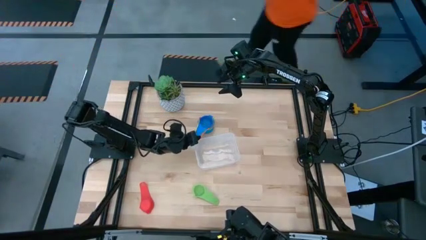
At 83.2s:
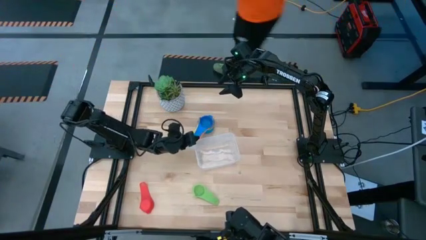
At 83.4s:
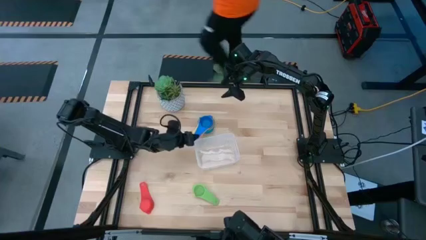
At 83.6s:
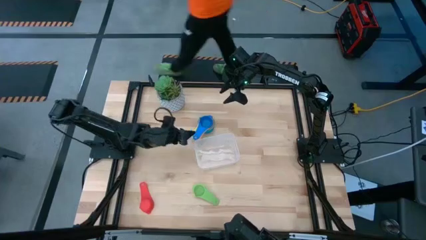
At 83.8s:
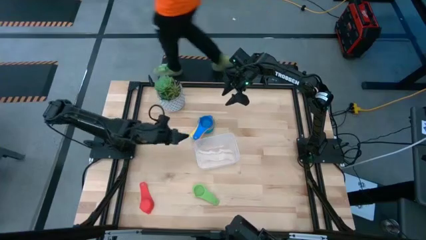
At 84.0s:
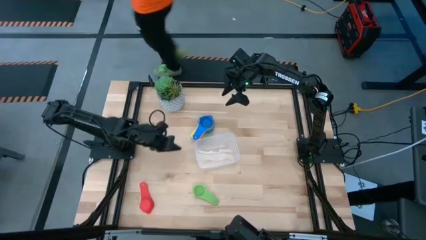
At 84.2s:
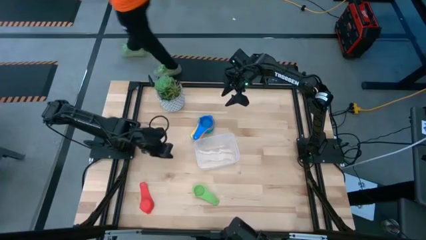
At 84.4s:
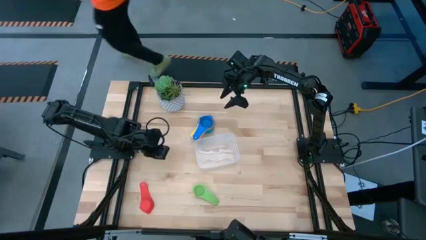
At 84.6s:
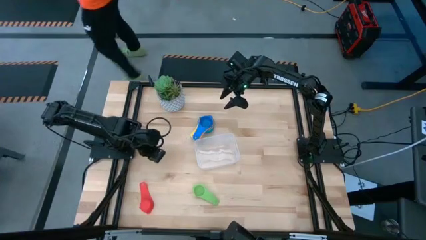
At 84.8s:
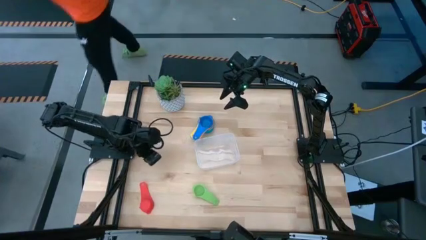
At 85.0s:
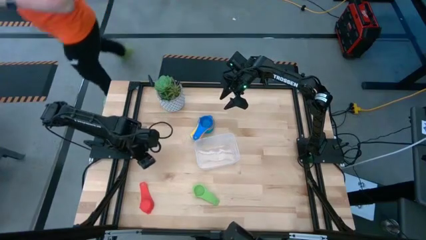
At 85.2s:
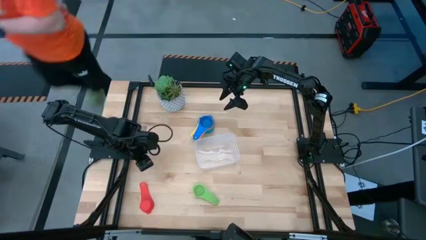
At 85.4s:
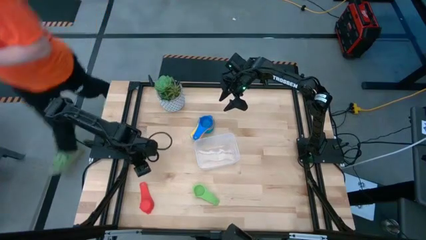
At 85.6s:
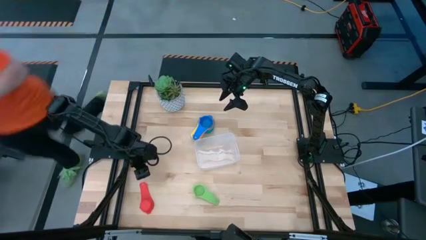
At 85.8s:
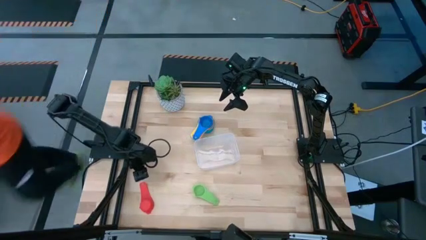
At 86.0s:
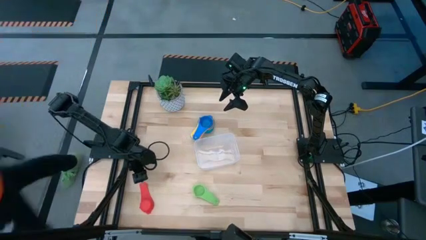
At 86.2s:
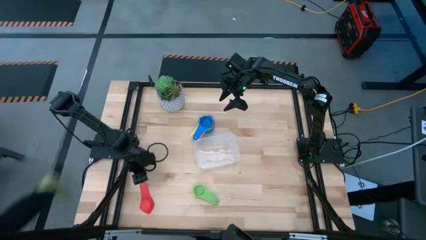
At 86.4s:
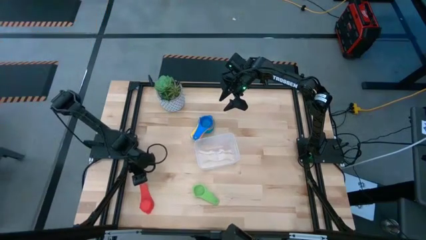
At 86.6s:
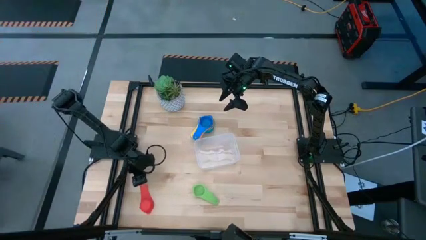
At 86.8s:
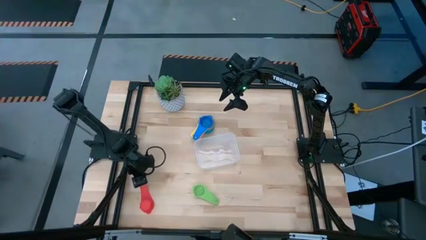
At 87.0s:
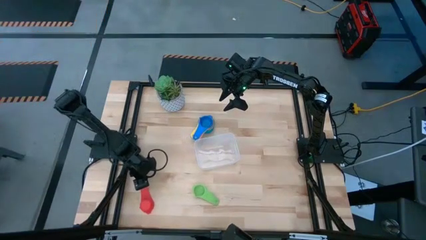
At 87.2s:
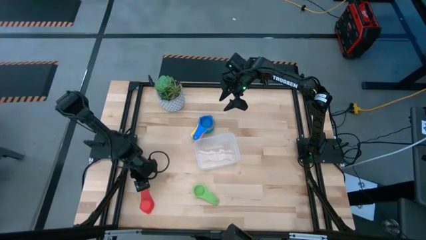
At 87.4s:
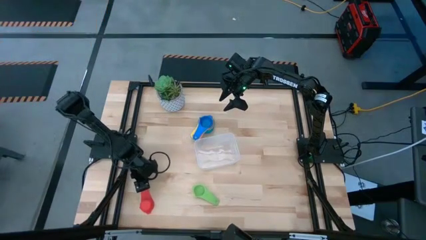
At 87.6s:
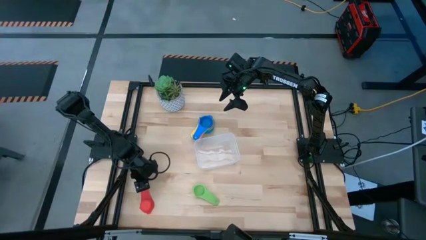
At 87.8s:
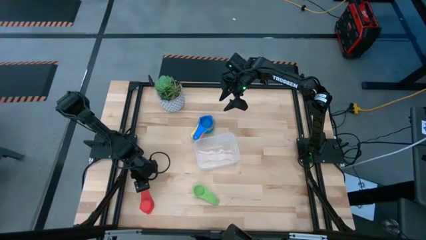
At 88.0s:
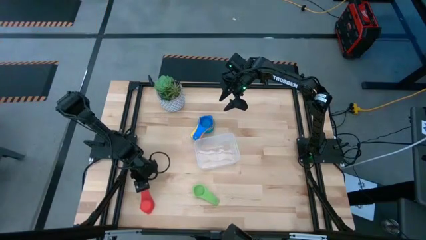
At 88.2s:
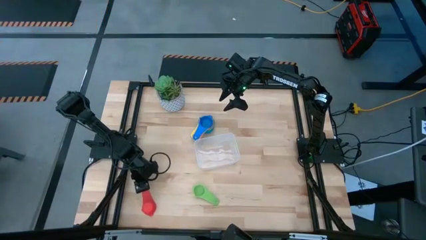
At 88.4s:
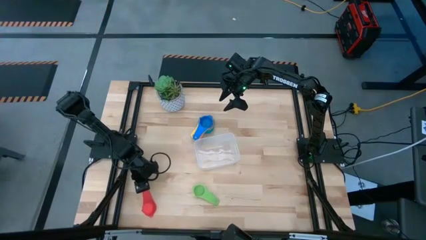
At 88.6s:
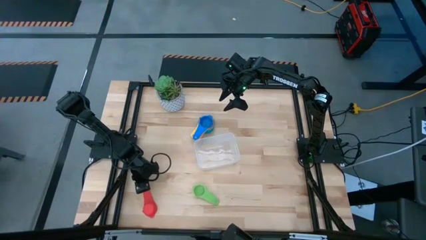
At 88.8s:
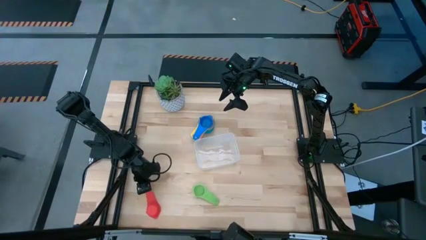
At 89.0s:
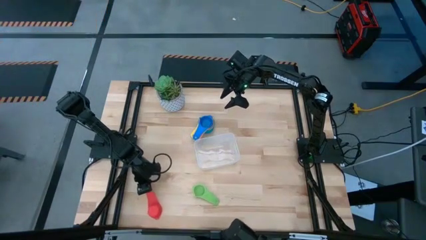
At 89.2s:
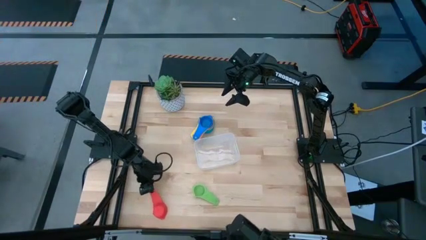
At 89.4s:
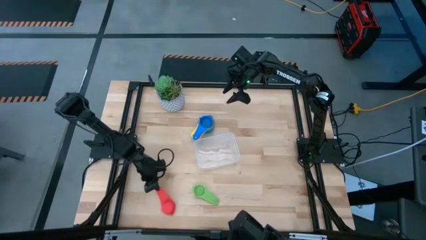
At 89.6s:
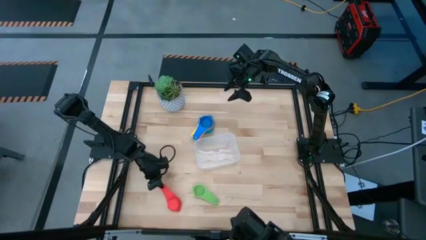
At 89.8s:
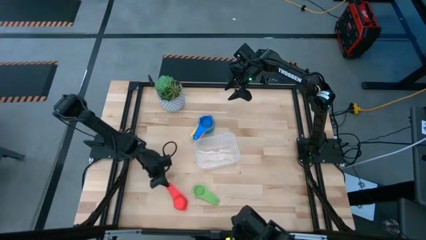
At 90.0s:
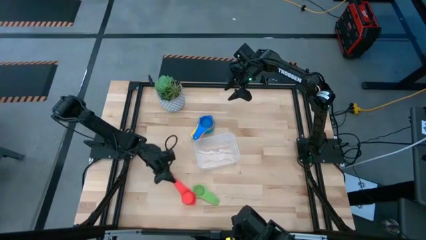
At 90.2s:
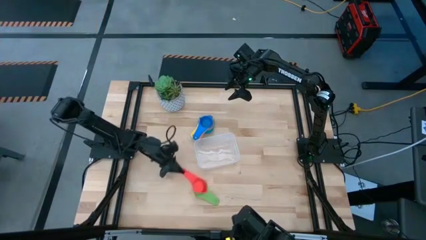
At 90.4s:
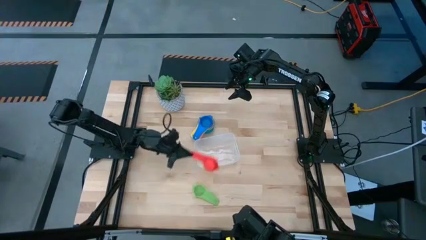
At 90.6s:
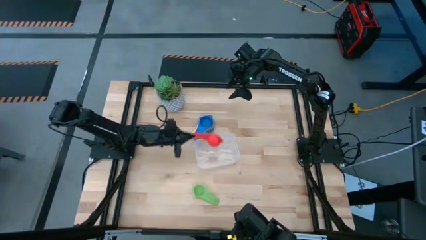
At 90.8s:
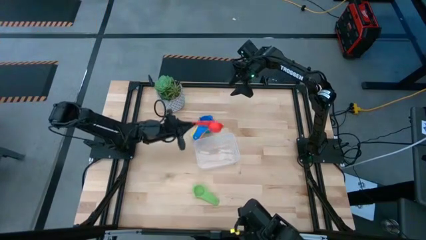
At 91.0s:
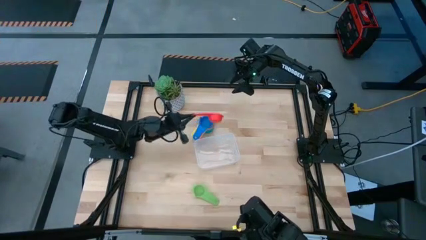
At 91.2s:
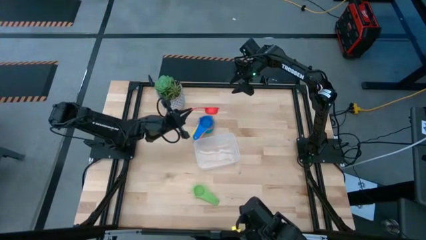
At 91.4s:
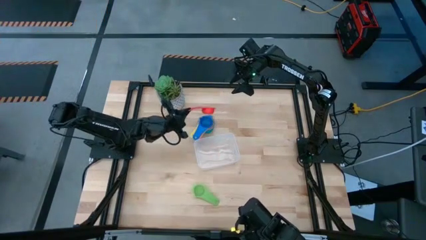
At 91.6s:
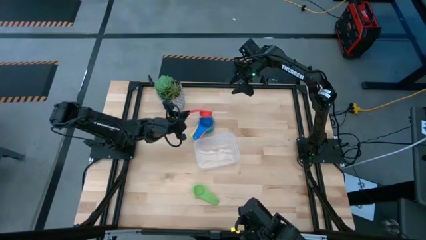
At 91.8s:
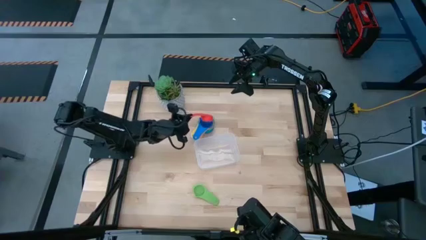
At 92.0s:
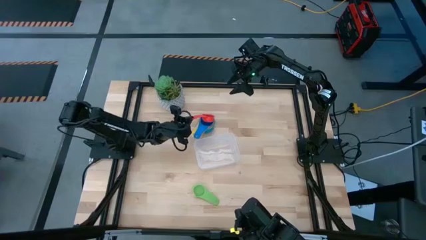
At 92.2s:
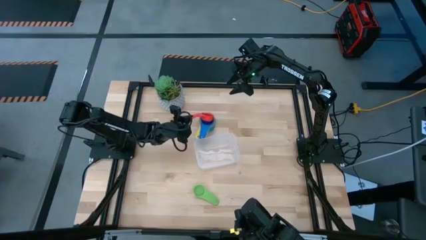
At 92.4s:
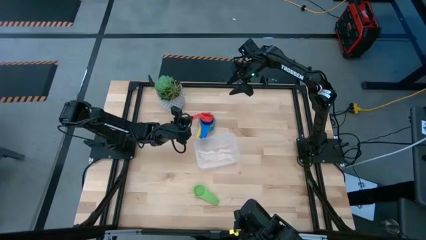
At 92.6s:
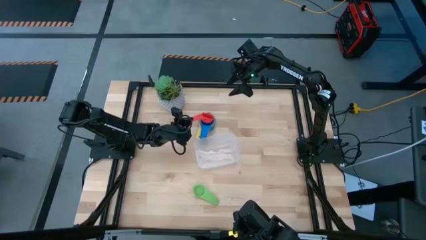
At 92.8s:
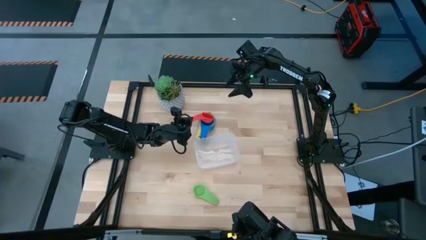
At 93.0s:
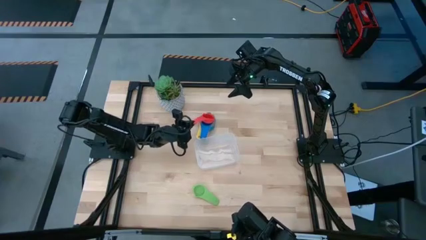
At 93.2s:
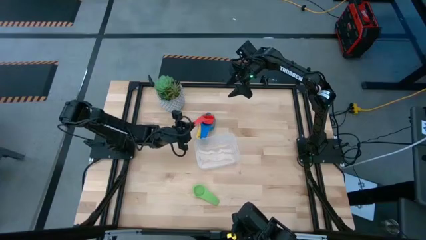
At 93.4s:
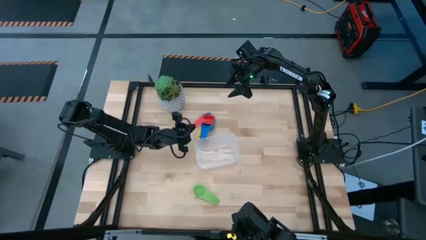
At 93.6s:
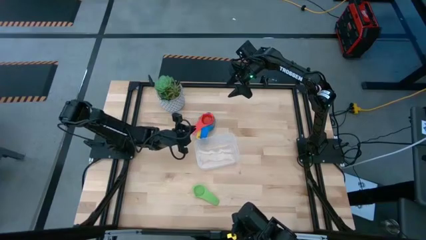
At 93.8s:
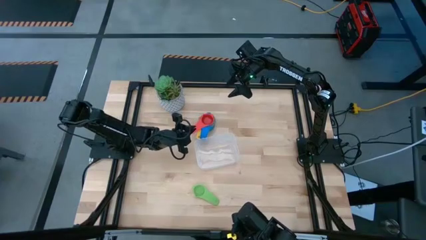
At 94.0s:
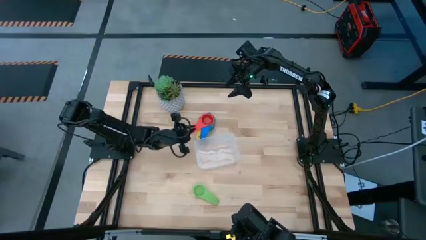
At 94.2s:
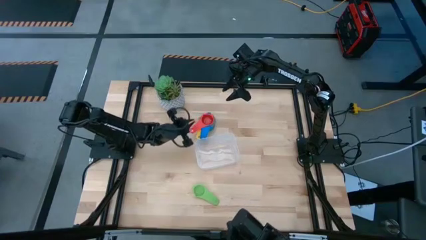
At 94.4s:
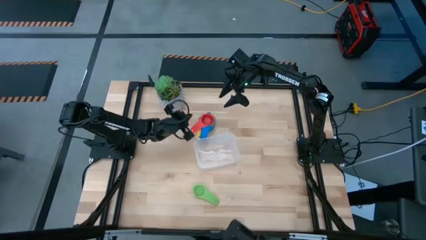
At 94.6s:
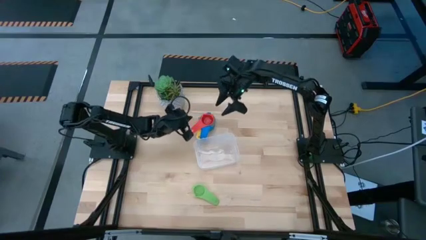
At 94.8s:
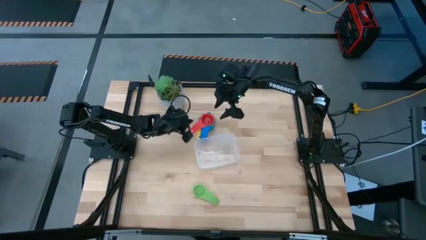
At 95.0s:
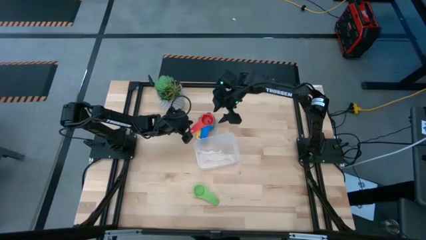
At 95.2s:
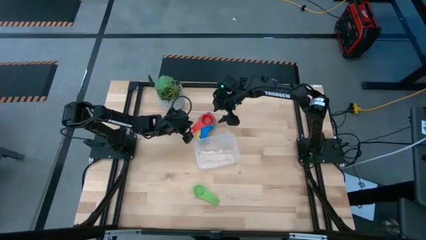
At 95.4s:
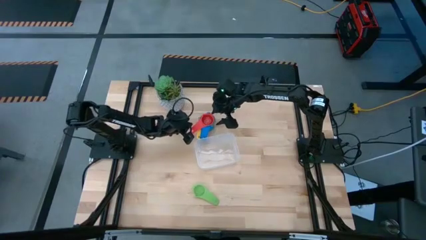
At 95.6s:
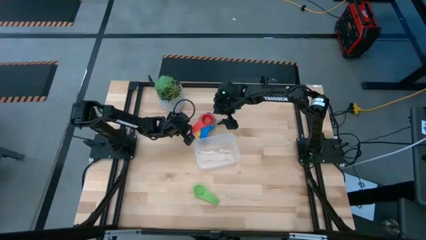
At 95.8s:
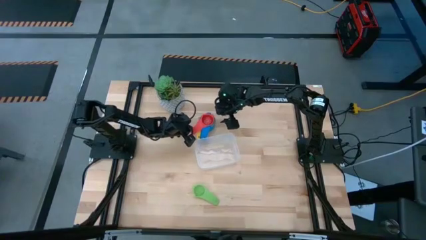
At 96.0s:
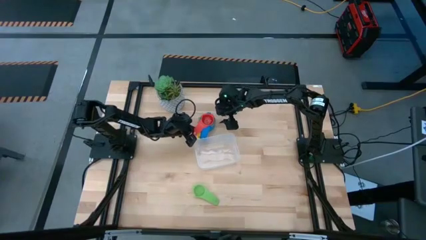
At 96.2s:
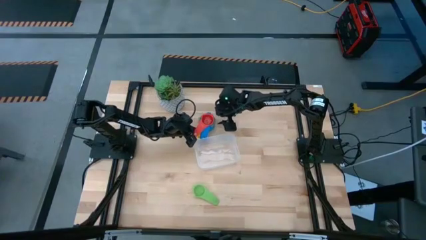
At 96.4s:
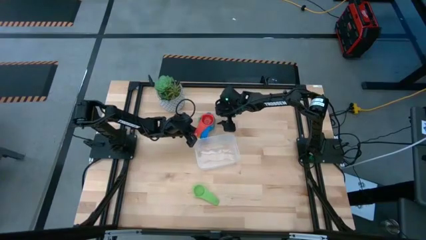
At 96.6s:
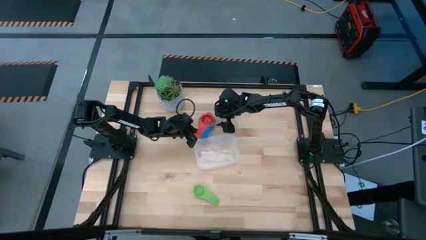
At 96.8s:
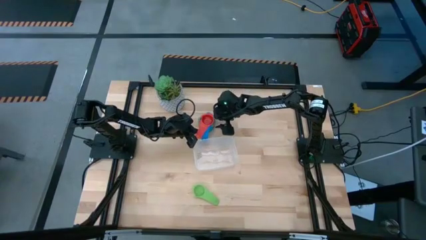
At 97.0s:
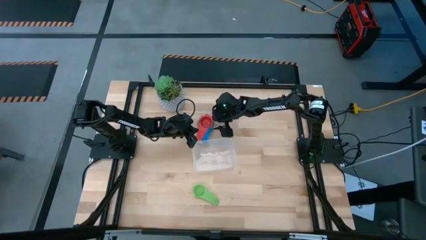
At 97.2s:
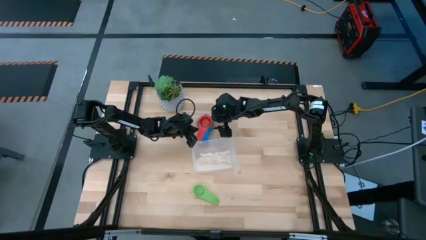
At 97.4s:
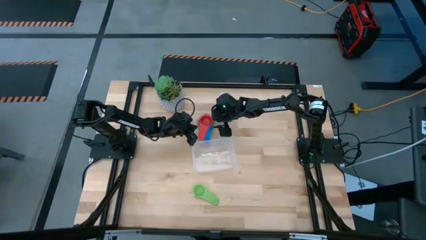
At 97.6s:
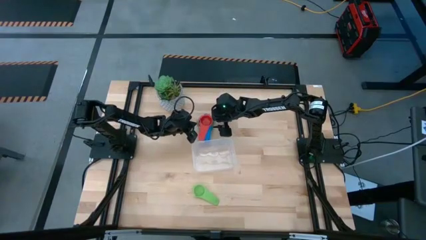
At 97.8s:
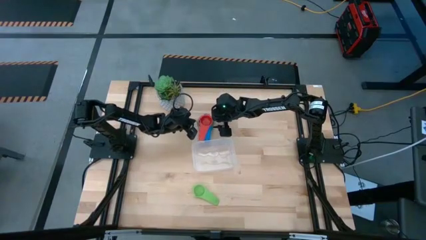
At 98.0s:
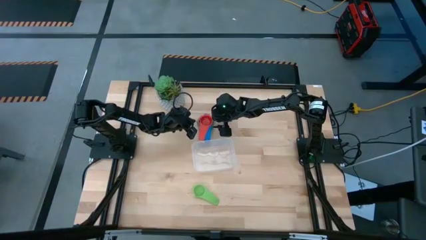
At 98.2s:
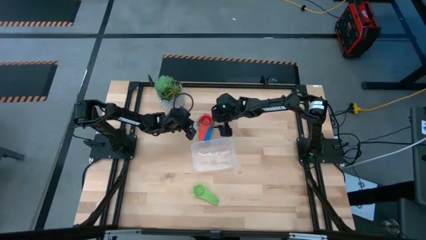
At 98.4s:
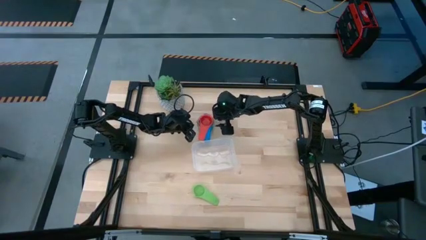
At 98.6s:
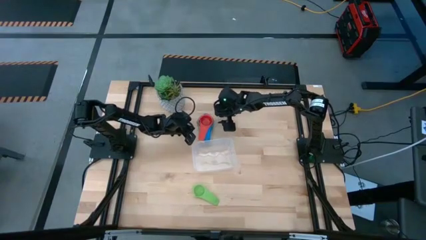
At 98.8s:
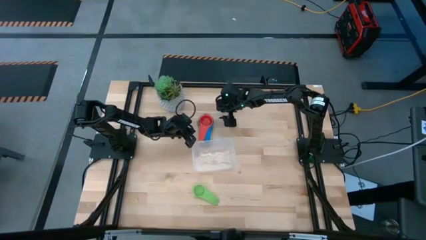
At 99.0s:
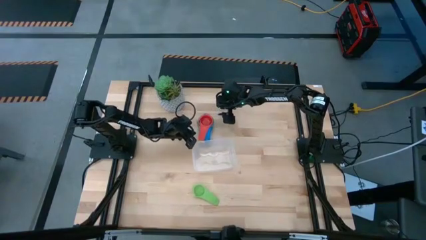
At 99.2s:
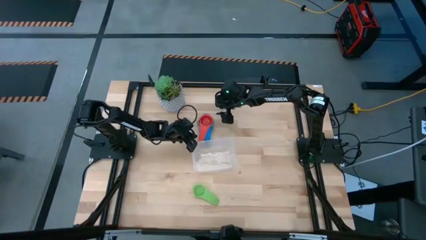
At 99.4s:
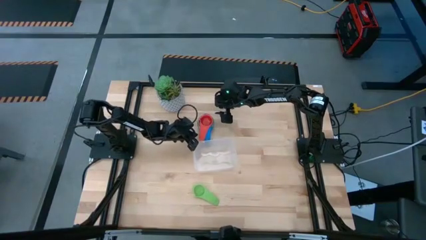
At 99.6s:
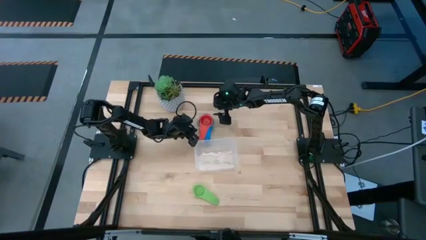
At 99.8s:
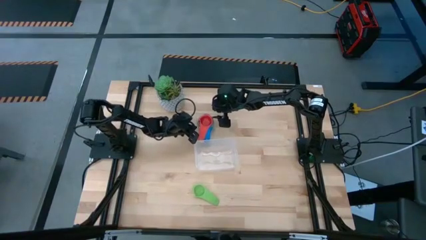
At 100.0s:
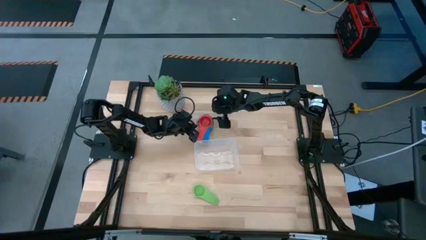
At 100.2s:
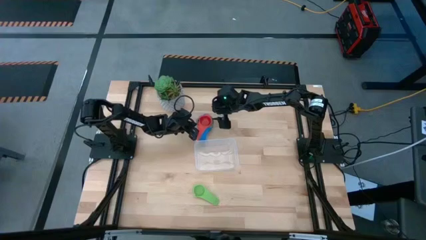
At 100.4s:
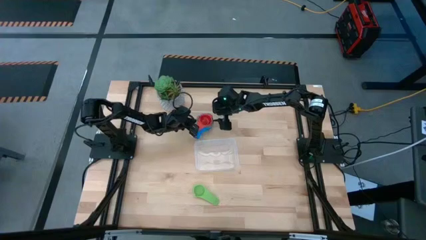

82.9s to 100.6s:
Task: Nest measuring cups in basket
Stack the red measuring cup on top of the blue measuring cup
